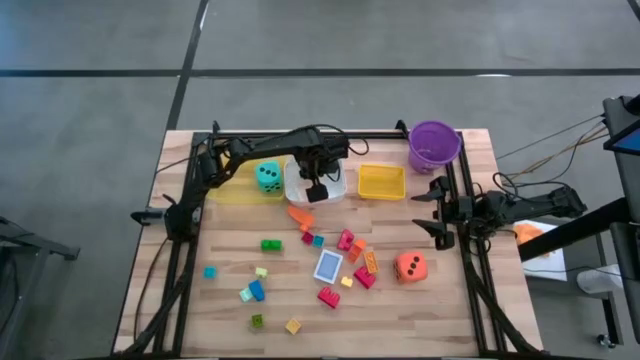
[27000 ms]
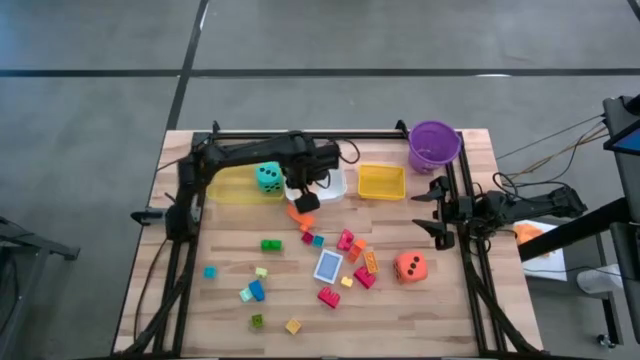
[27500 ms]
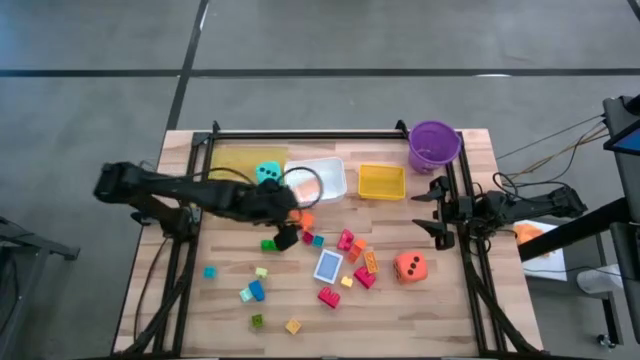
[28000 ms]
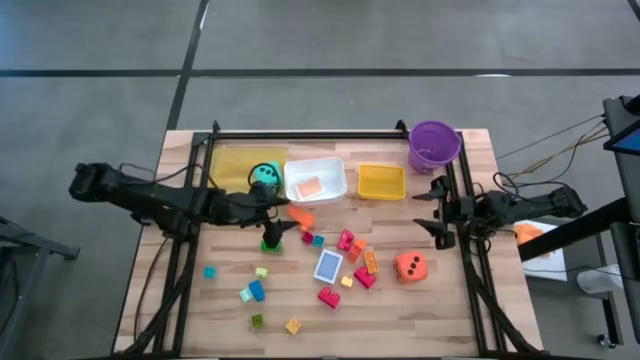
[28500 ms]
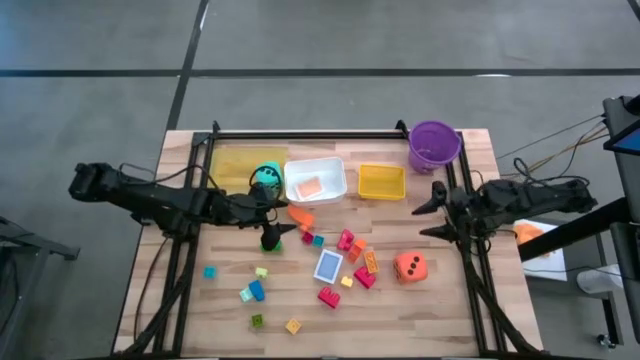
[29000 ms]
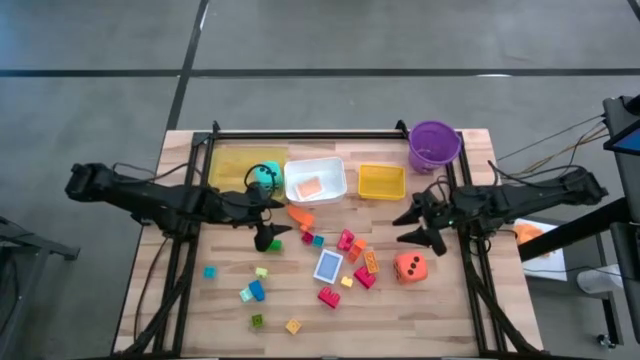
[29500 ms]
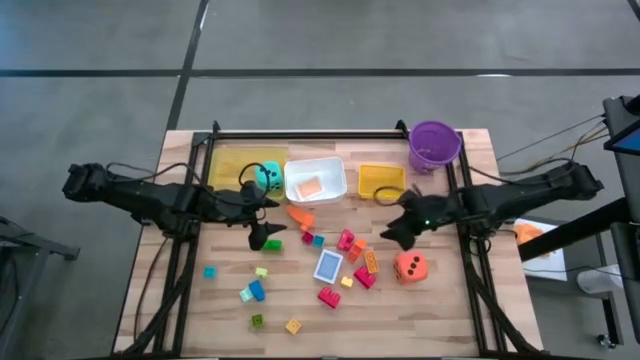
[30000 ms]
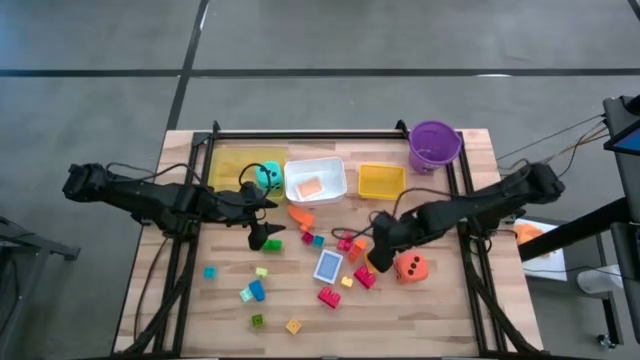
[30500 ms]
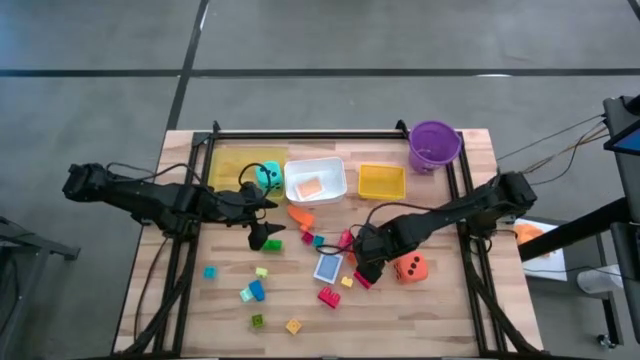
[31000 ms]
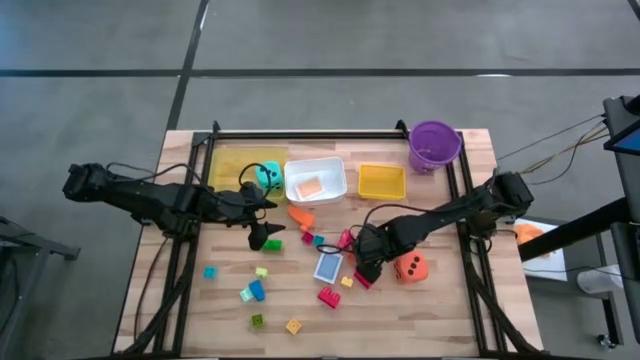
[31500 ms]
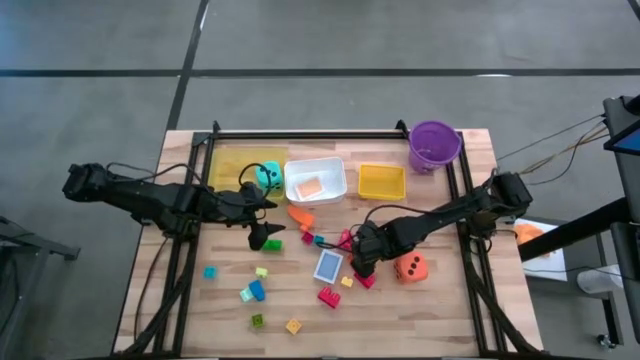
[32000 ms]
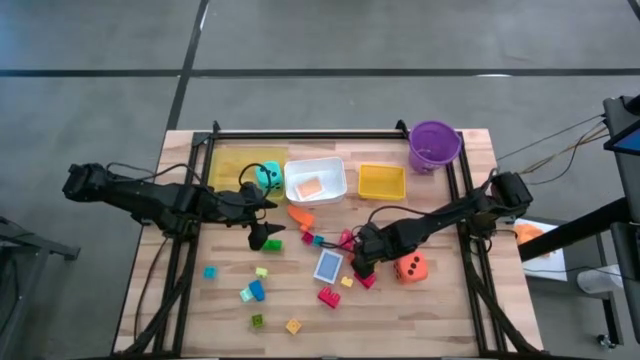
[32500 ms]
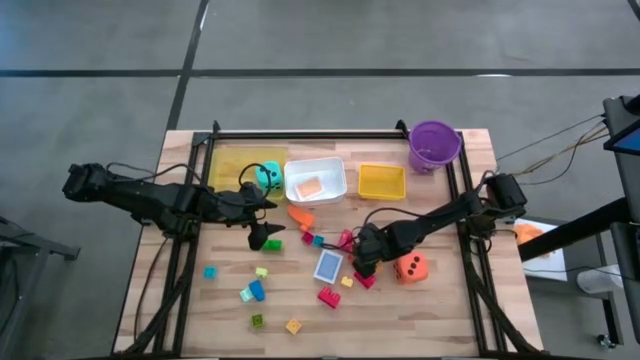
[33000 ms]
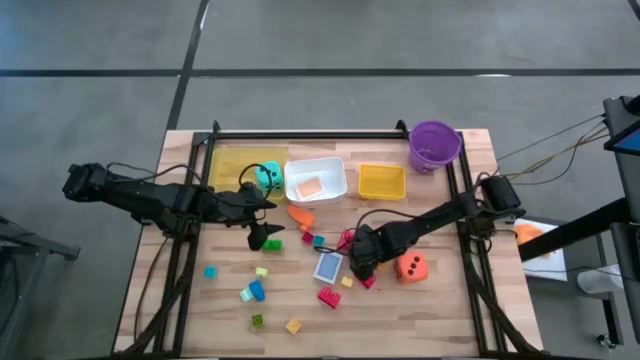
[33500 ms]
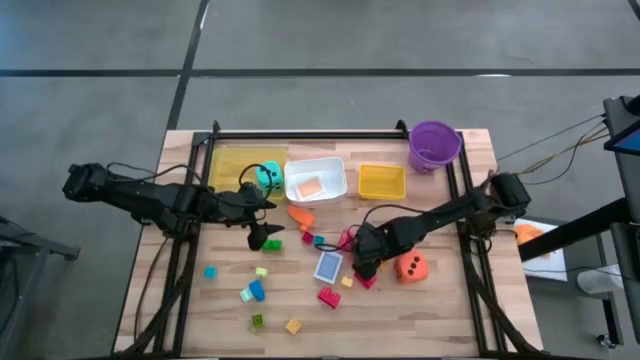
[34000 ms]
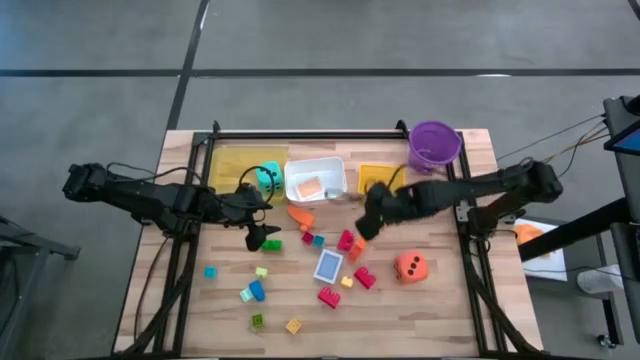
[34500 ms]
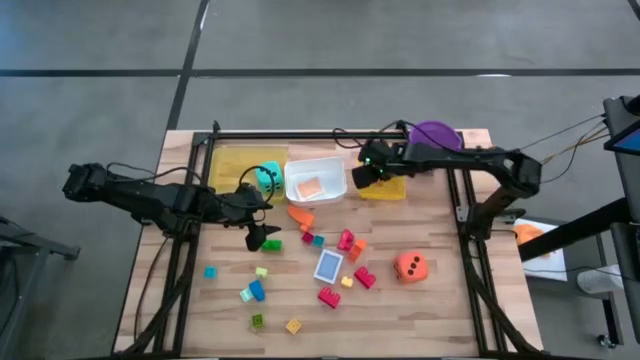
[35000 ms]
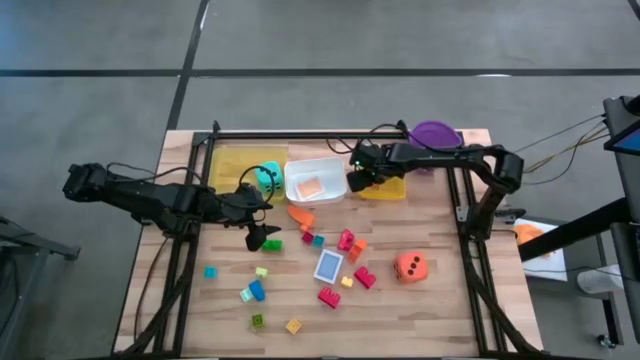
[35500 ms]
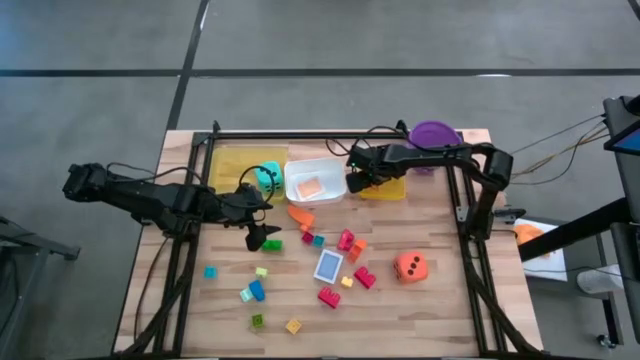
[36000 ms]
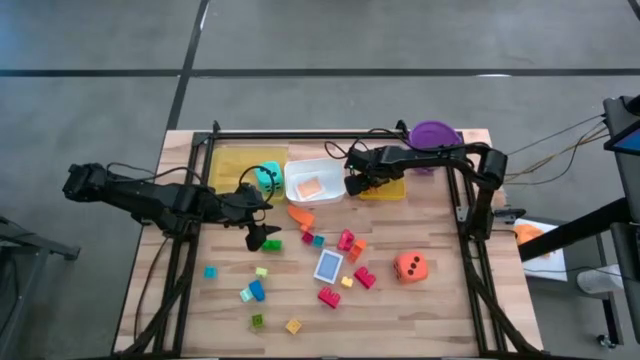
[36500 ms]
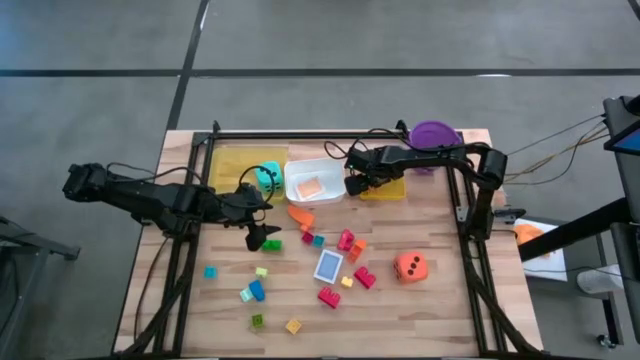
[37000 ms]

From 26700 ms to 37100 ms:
Task: Pick & Place Toys
Put the yellow game piece into the yellow bin

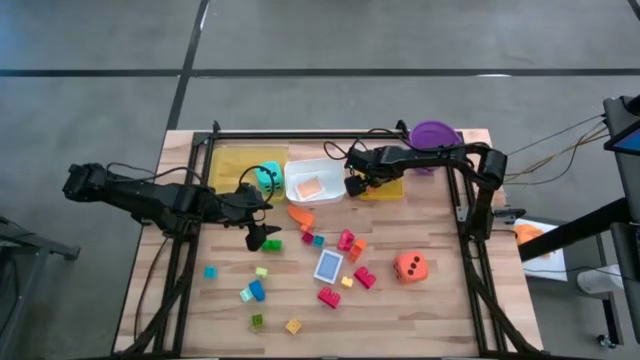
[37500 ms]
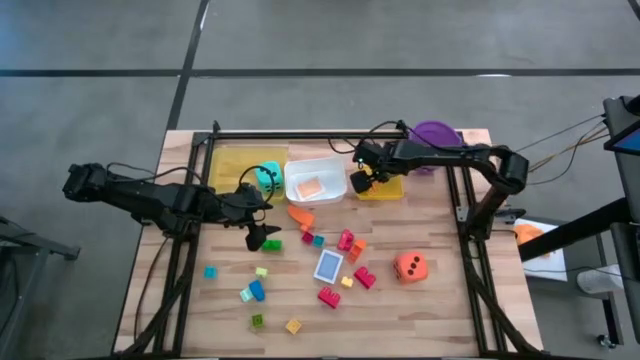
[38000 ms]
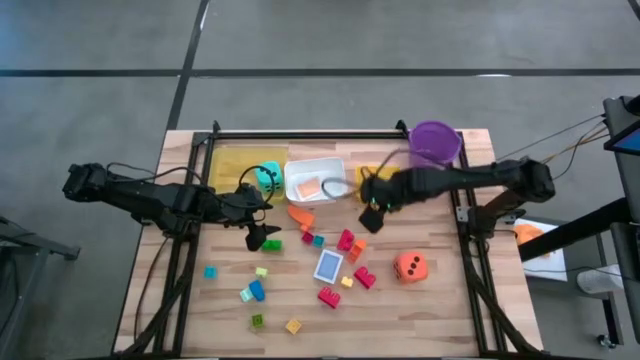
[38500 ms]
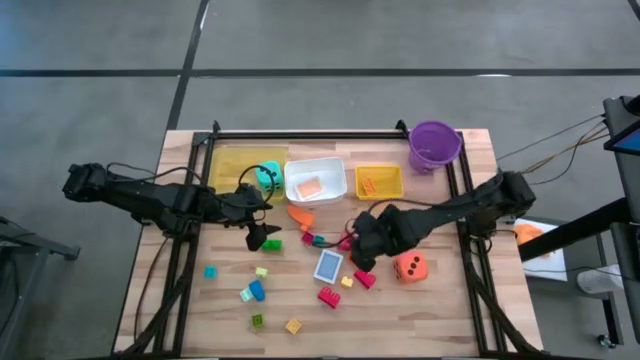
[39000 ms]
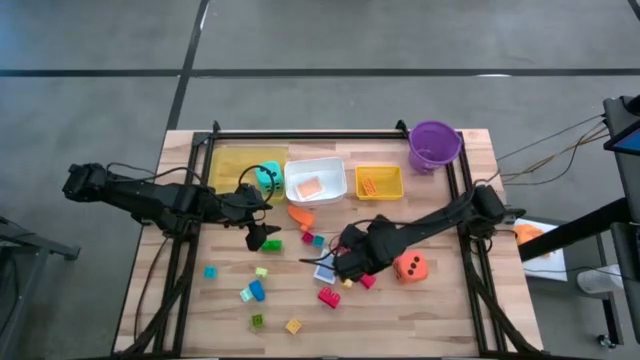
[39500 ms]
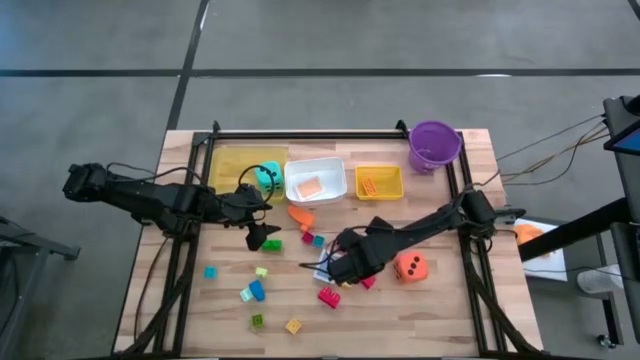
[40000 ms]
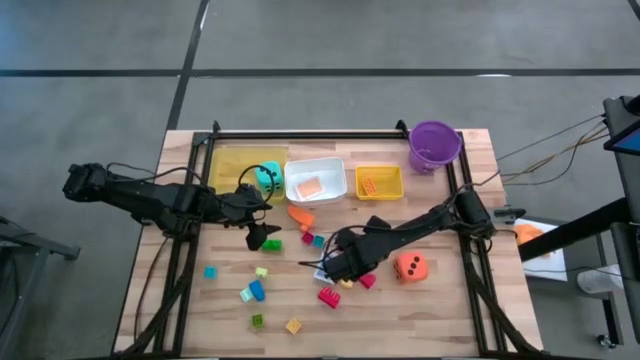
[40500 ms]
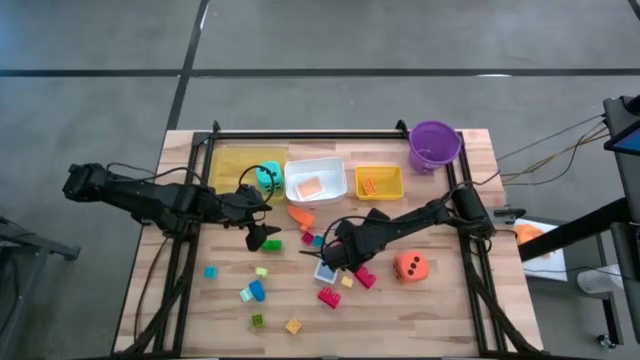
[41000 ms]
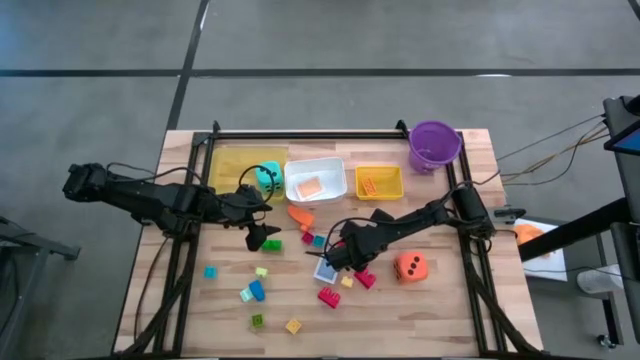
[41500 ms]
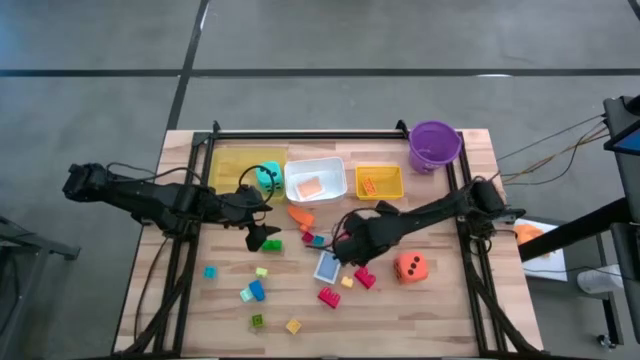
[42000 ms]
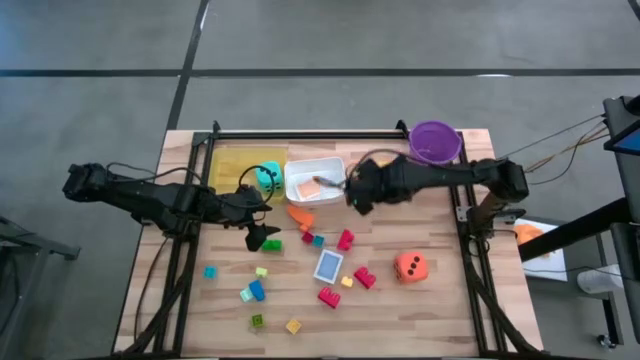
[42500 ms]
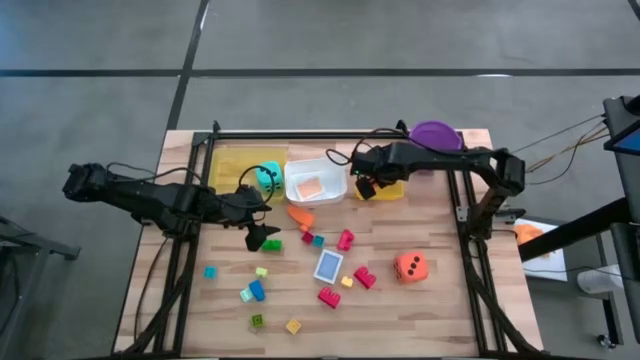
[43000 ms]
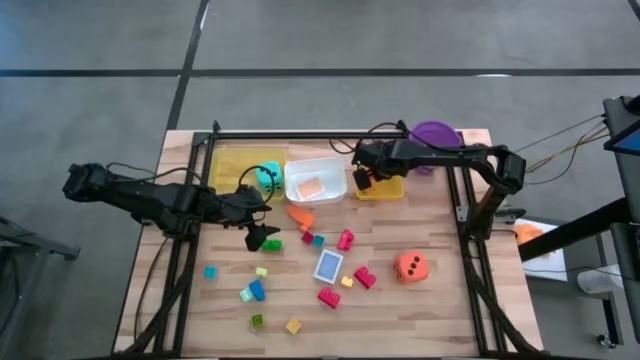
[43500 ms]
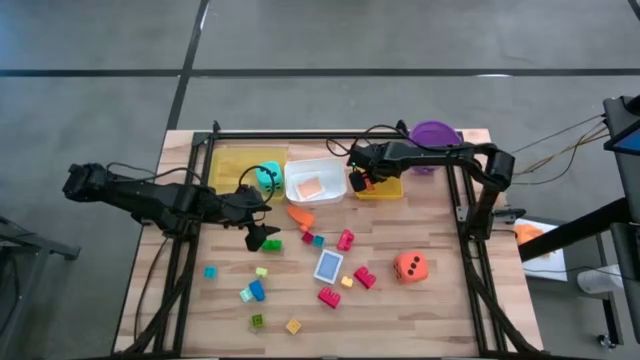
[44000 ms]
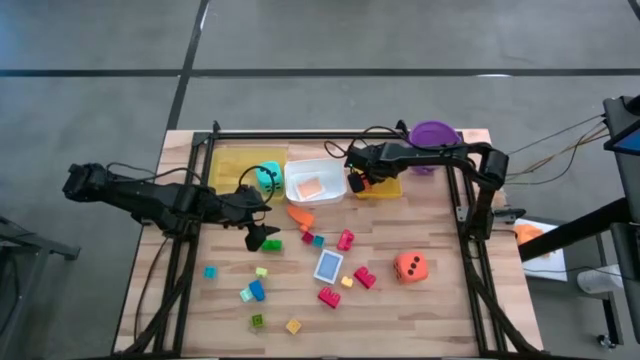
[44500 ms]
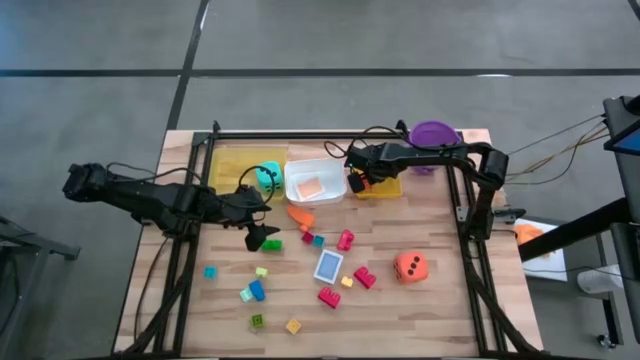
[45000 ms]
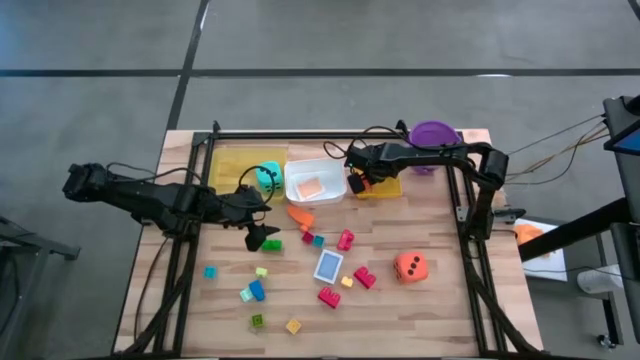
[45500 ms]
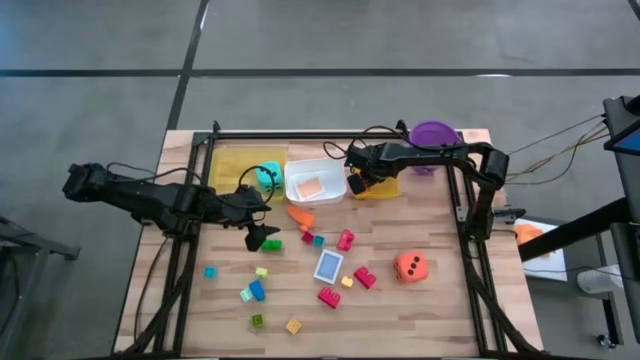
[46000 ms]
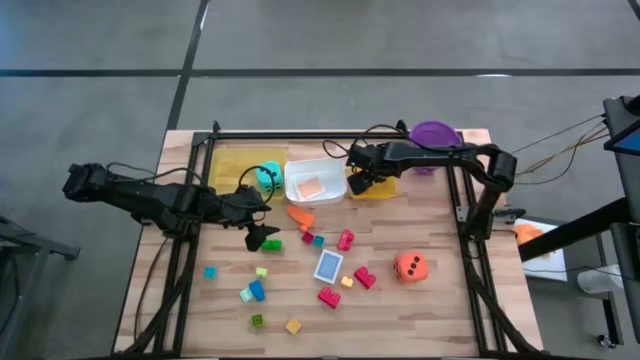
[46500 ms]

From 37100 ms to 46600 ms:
Put the orange game piece into the yellow bin
